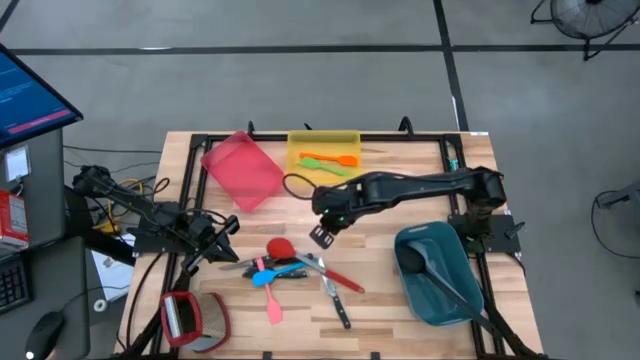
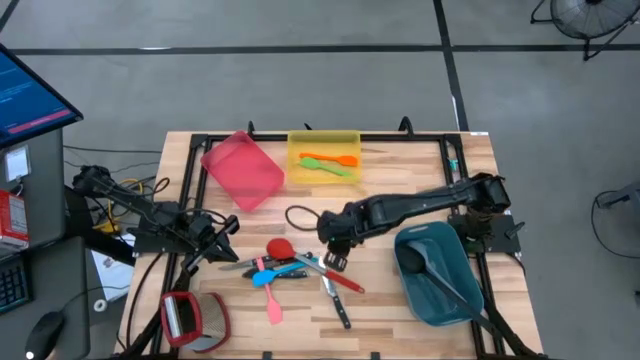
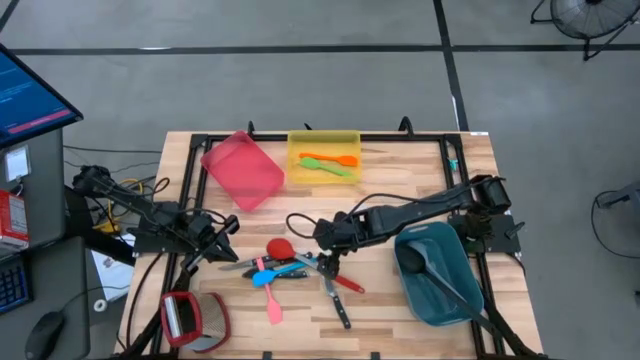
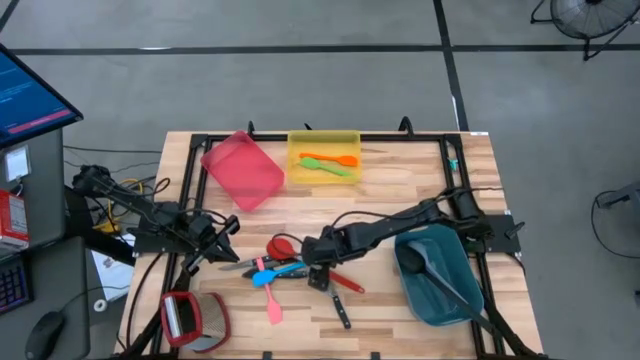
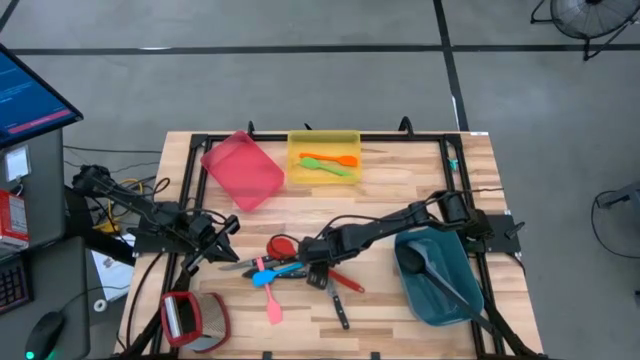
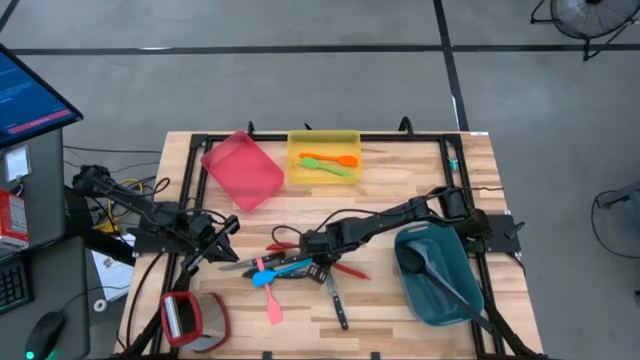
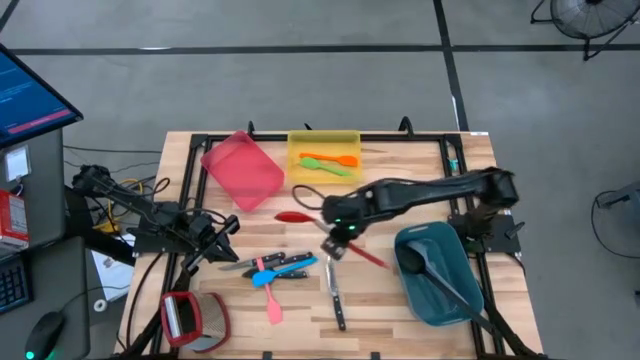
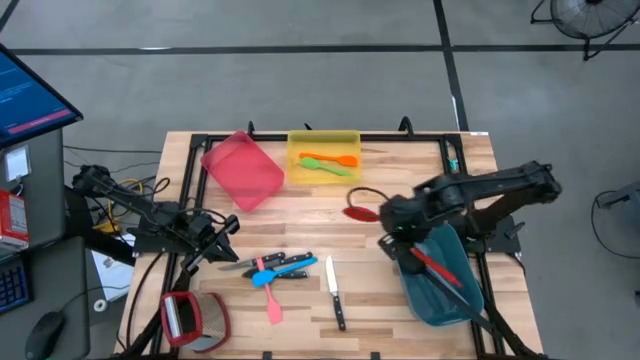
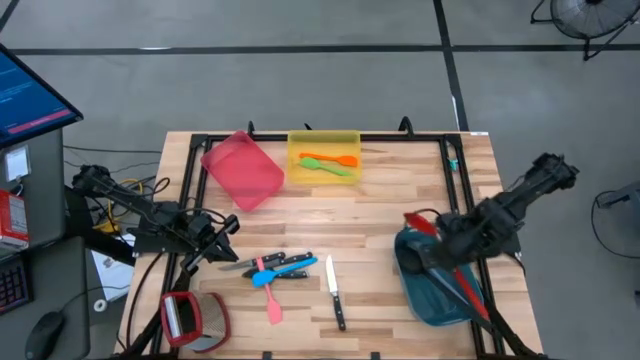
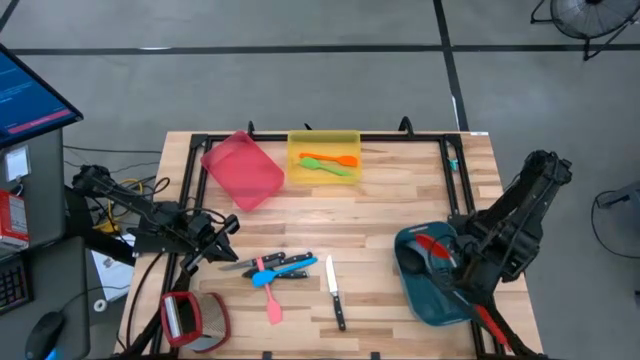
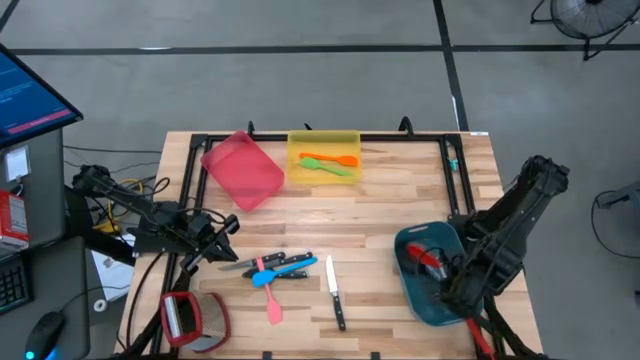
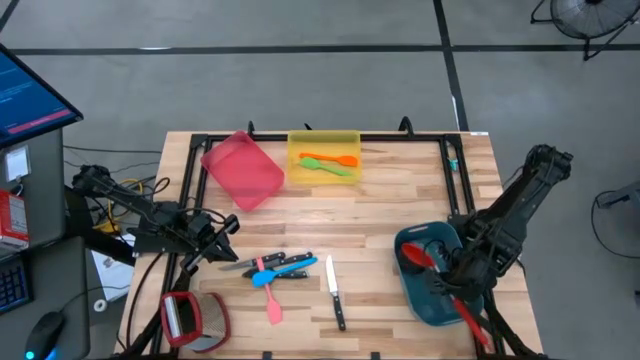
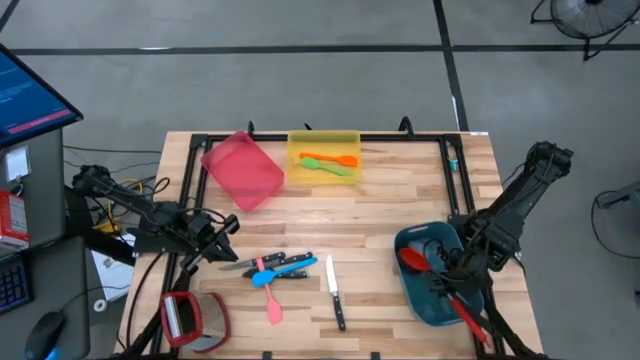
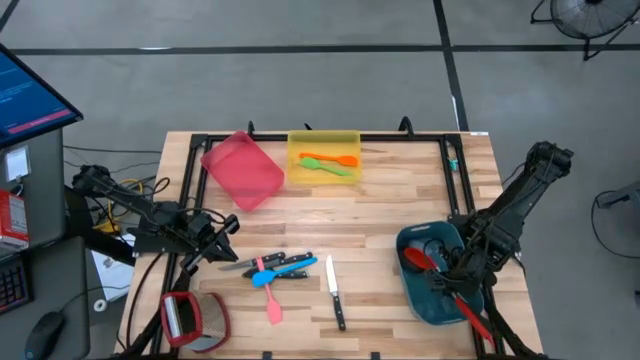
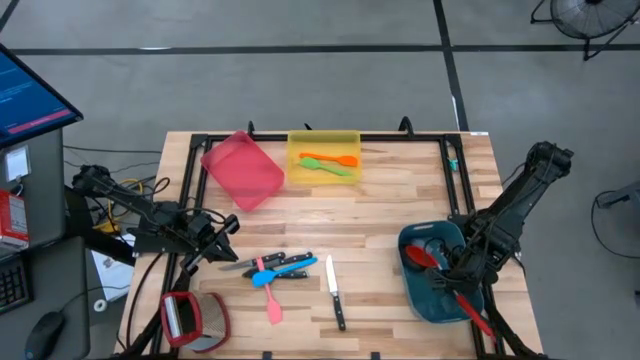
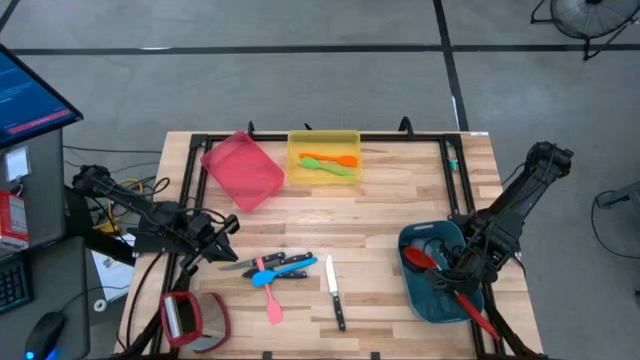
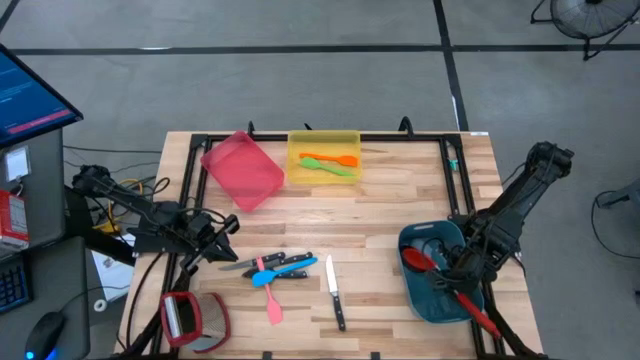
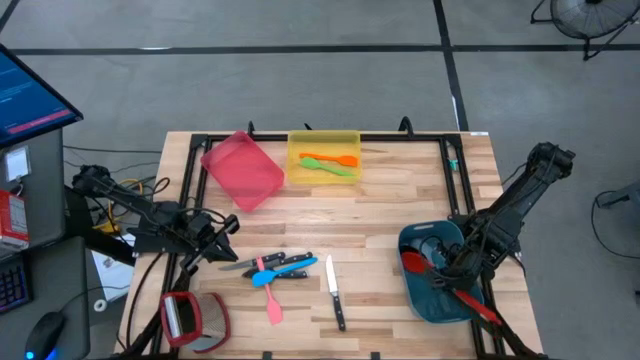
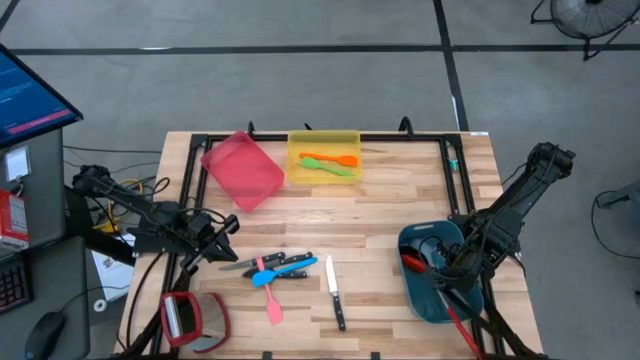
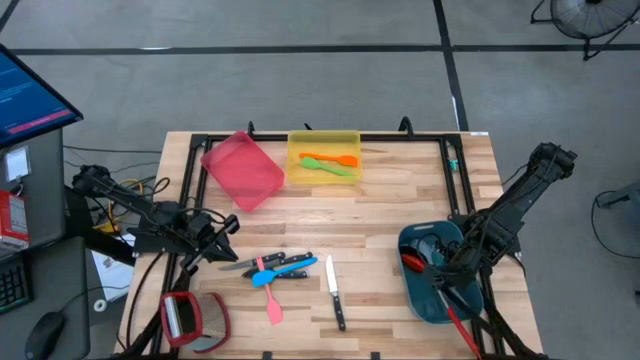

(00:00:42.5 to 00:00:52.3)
Task: Pick & Place Kitchen Items
Put the red serving spoon into the dark blue bin

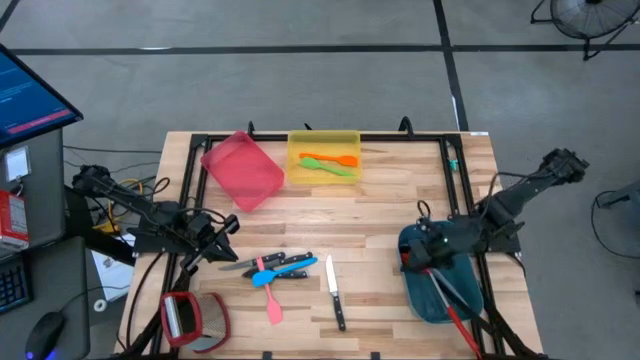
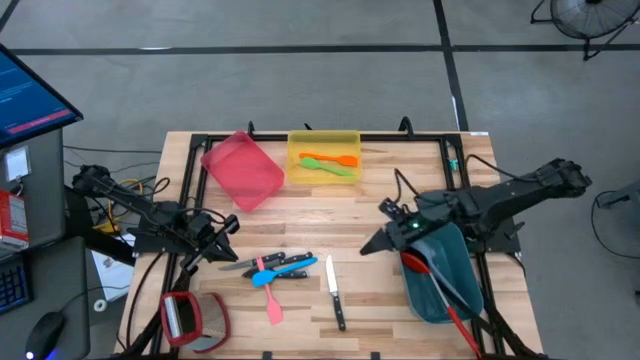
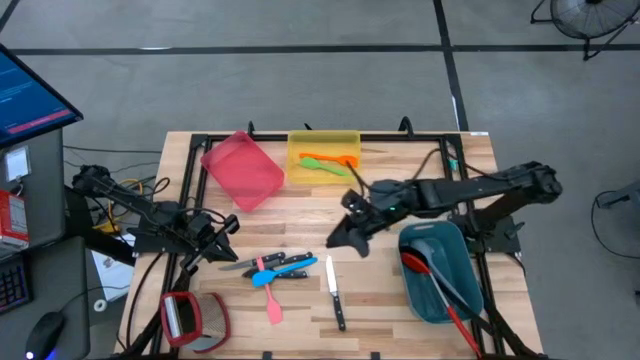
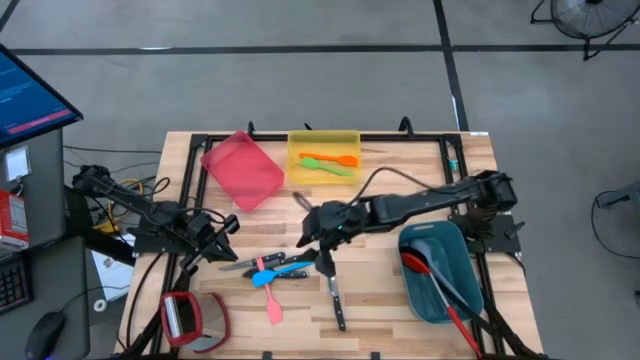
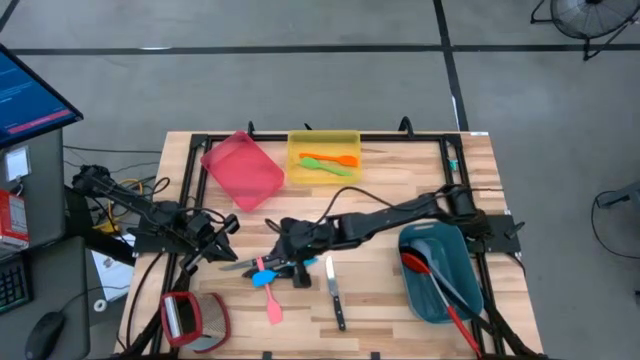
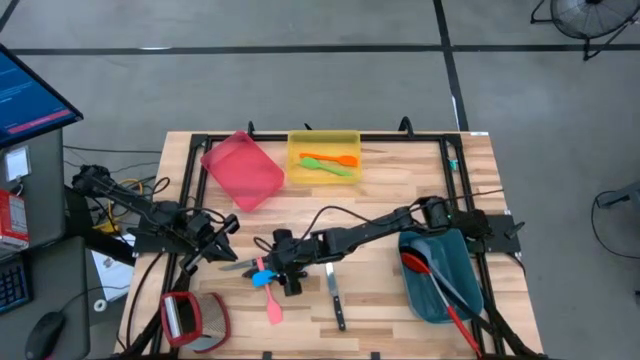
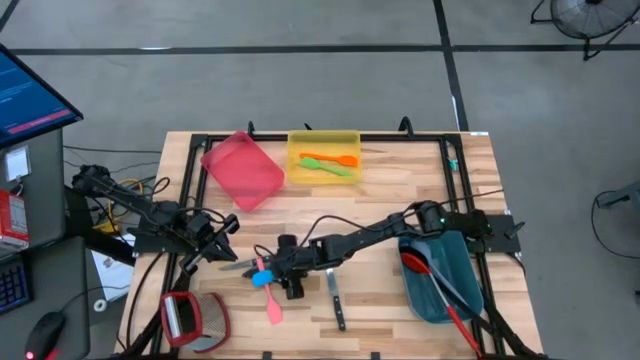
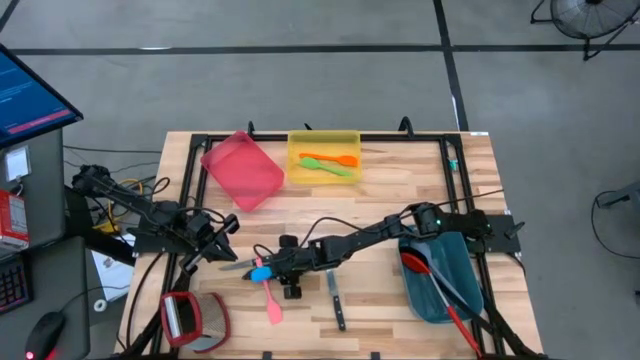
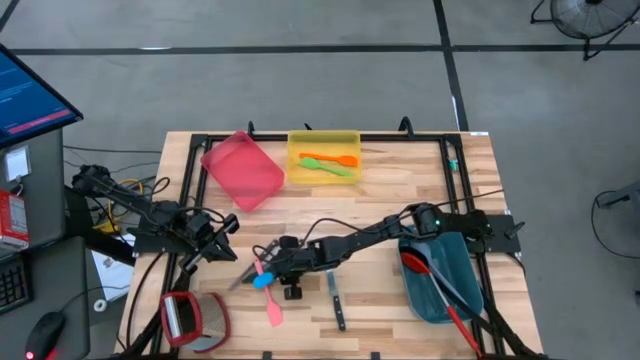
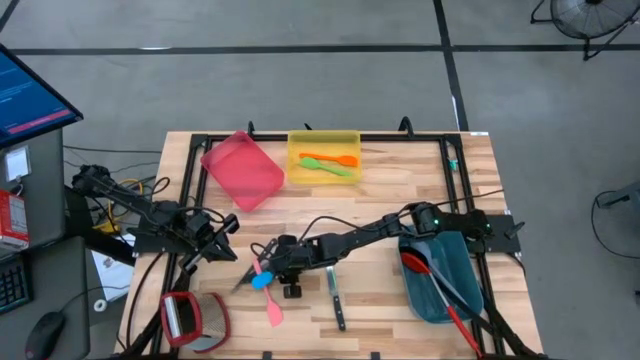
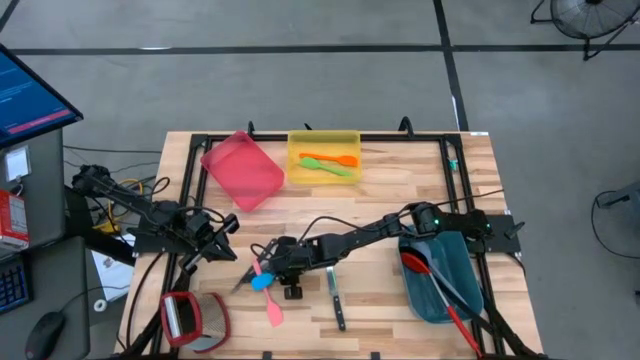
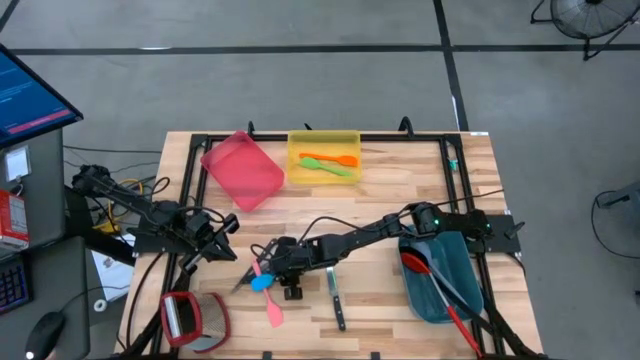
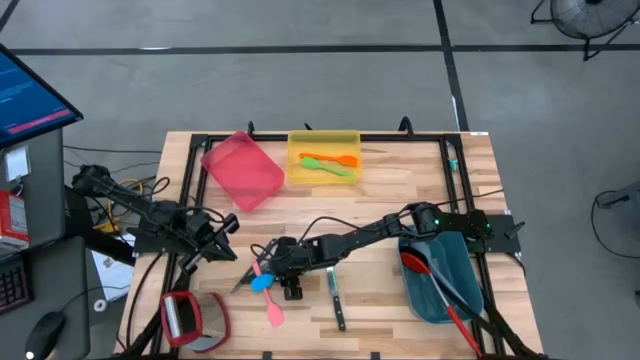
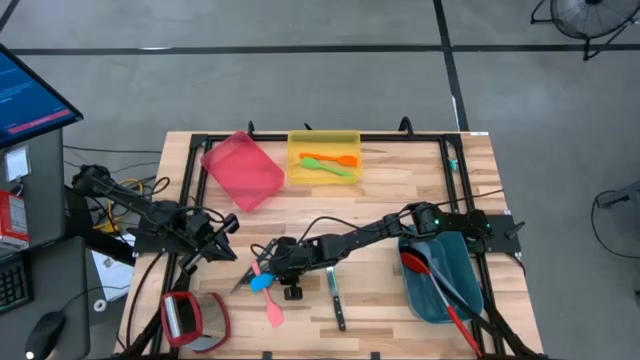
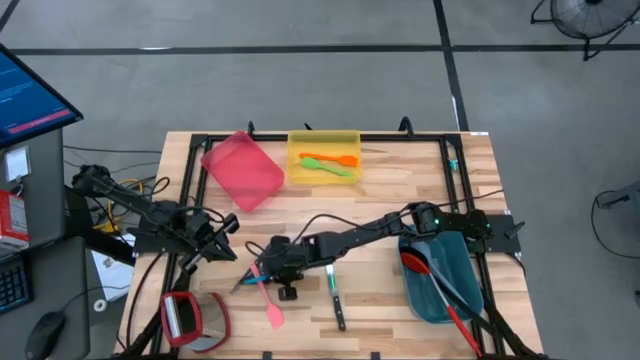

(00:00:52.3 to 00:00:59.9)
Put the blue spatula into the yellow bin

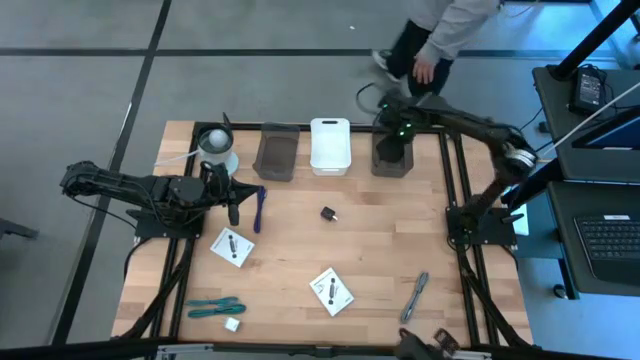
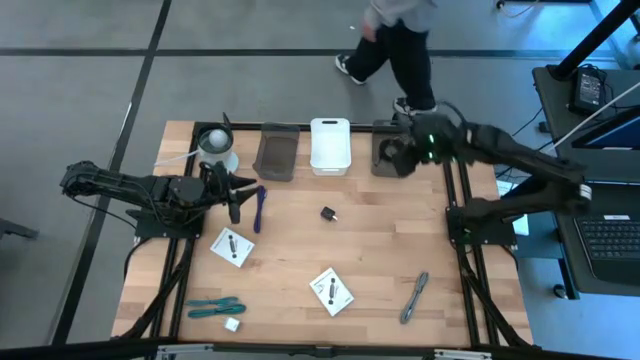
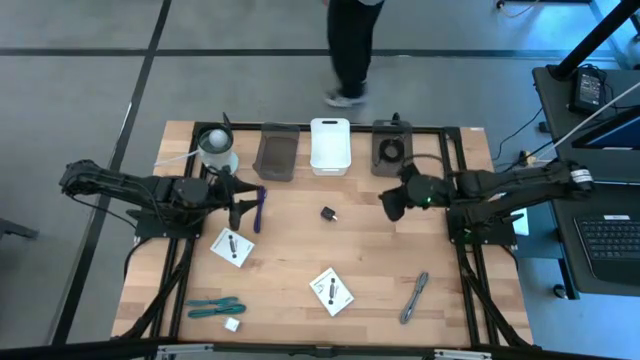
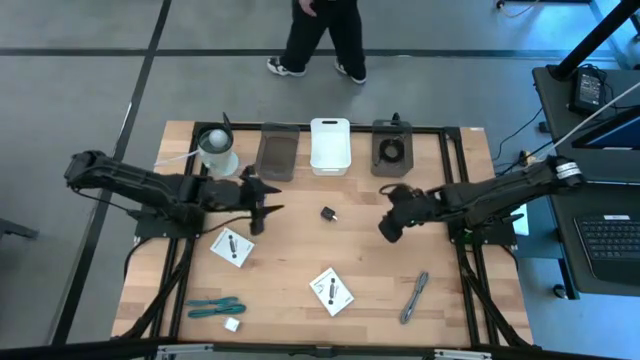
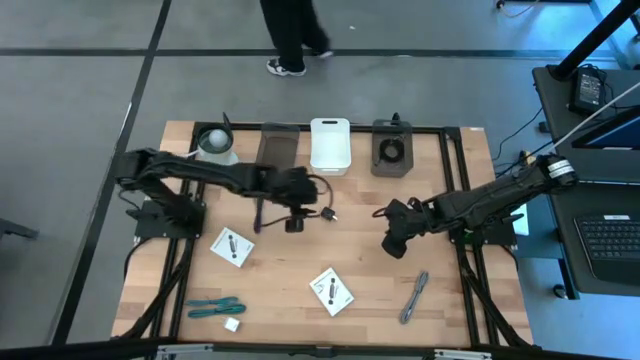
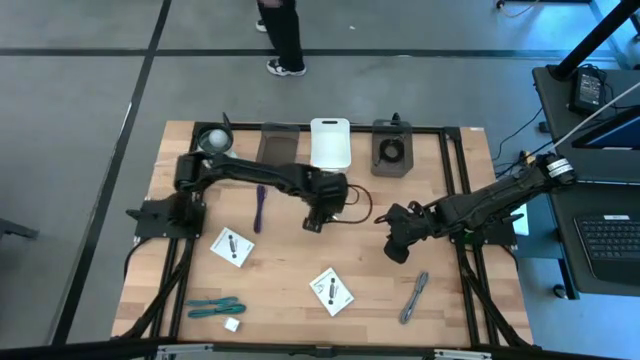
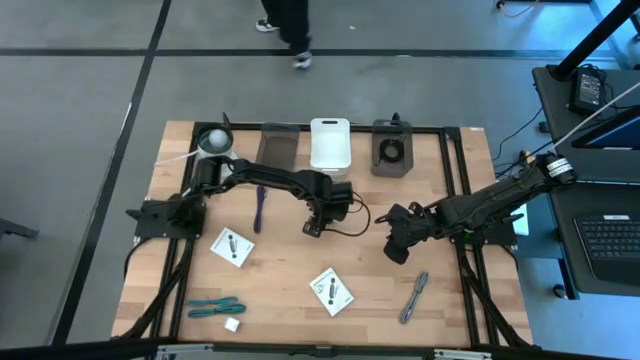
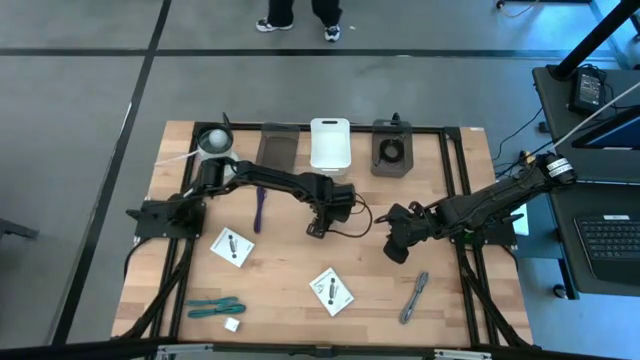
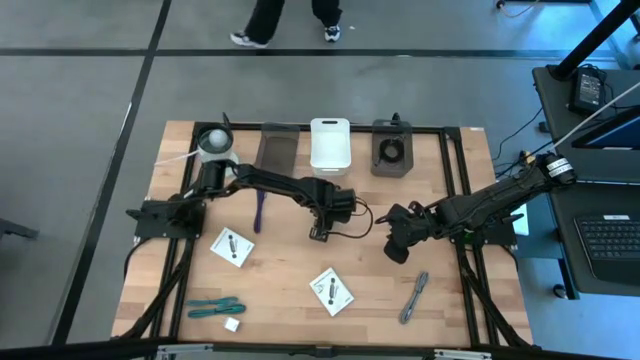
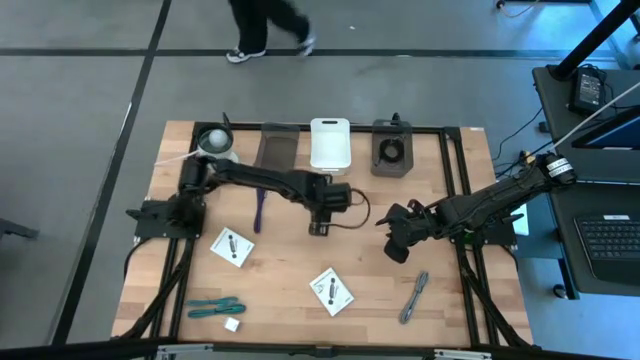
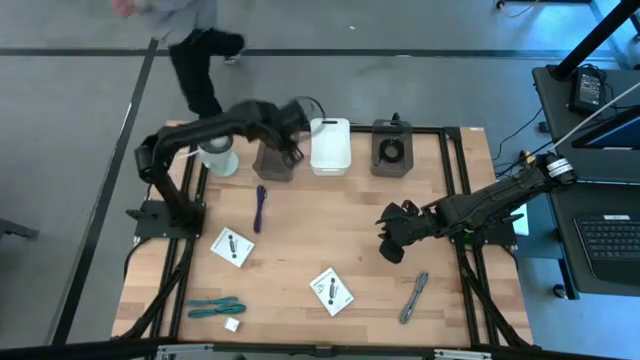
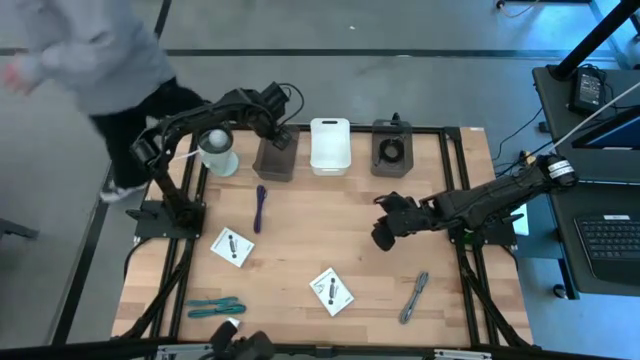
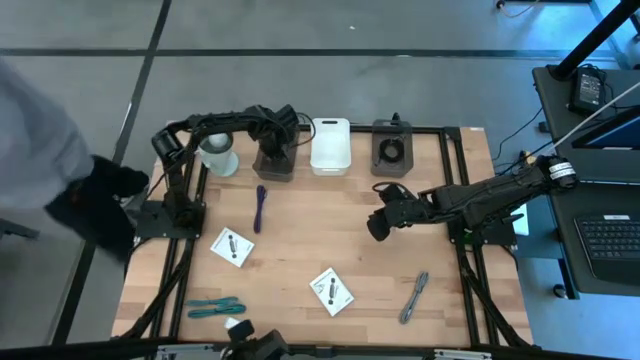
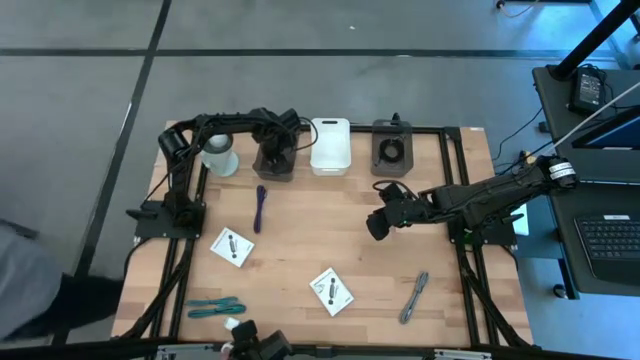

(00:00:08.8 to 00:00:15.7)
Task: Pick and place items into bin
Put the black charger adapter into the left black bin
